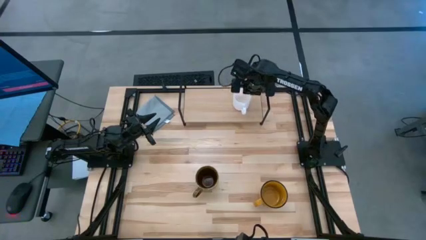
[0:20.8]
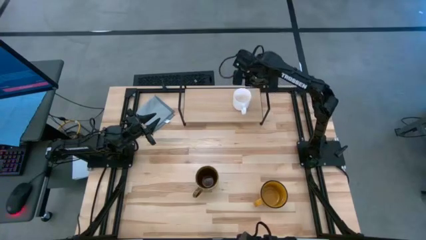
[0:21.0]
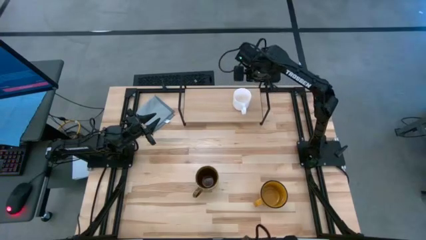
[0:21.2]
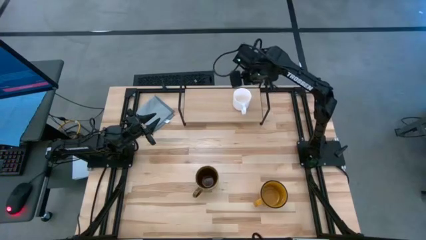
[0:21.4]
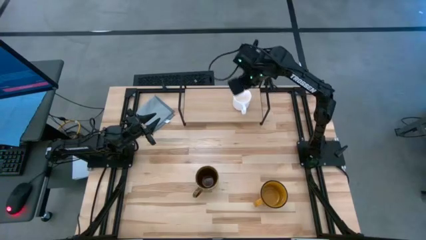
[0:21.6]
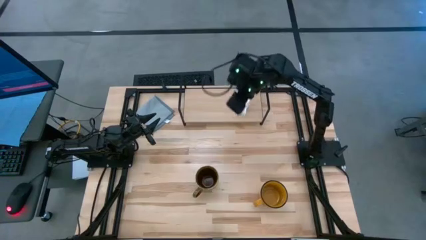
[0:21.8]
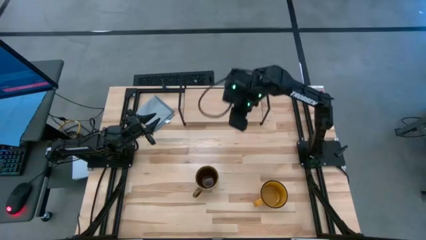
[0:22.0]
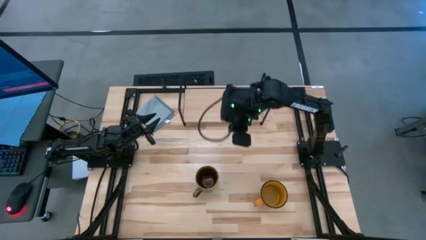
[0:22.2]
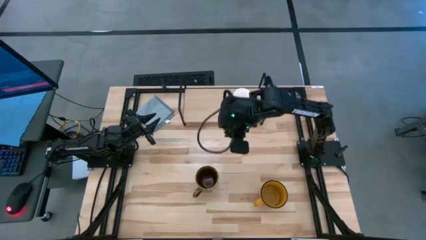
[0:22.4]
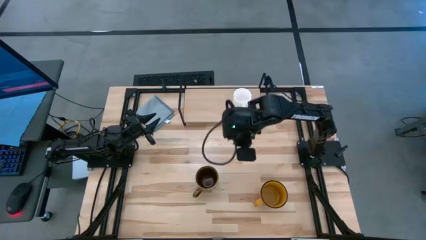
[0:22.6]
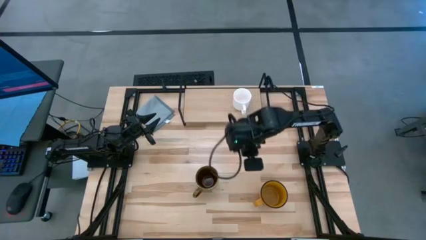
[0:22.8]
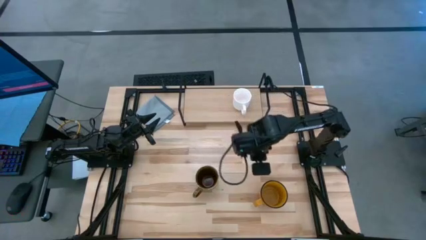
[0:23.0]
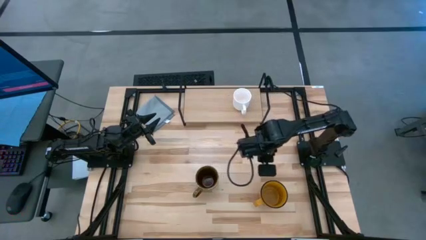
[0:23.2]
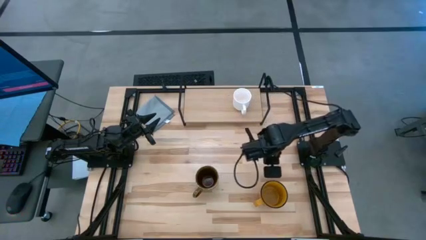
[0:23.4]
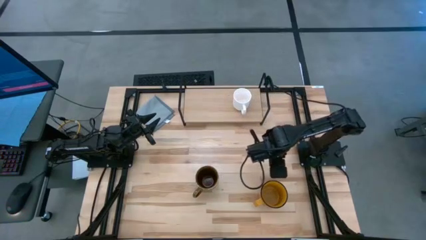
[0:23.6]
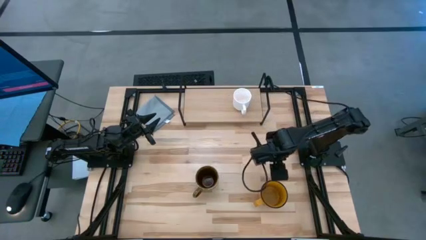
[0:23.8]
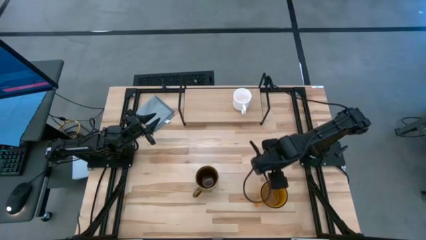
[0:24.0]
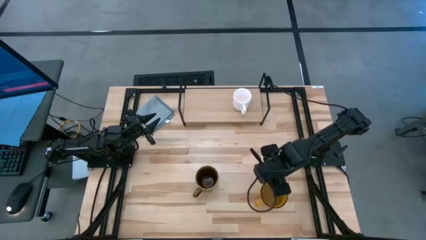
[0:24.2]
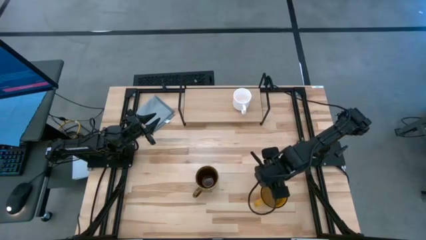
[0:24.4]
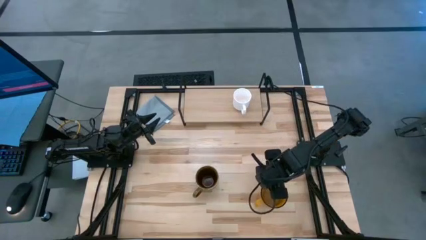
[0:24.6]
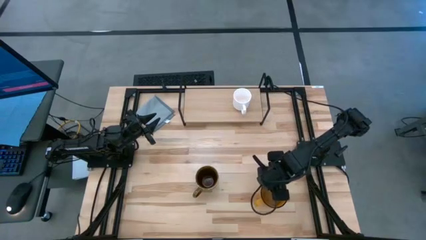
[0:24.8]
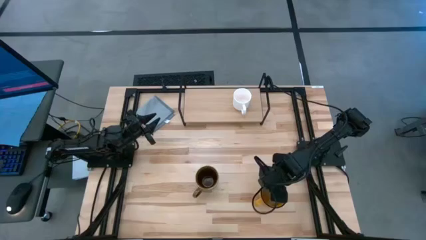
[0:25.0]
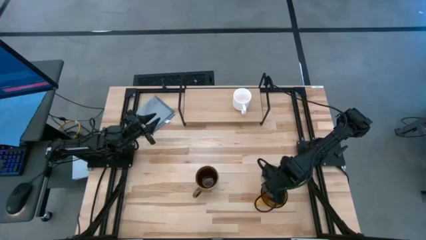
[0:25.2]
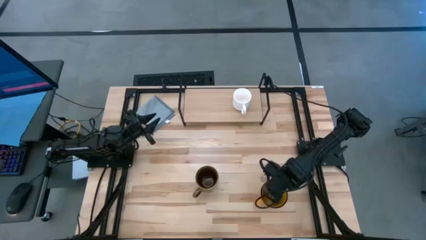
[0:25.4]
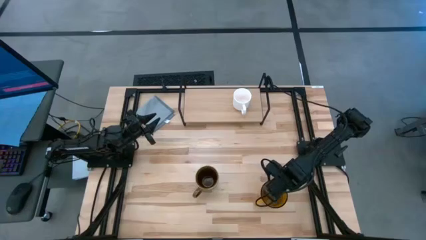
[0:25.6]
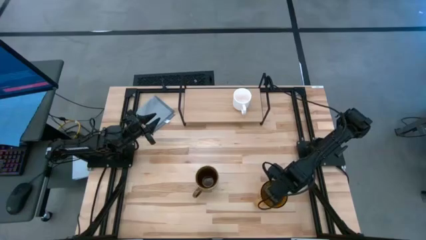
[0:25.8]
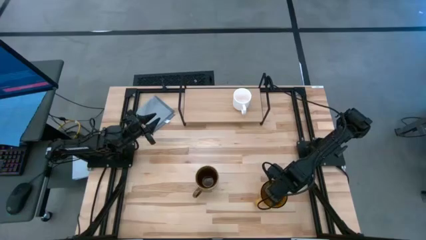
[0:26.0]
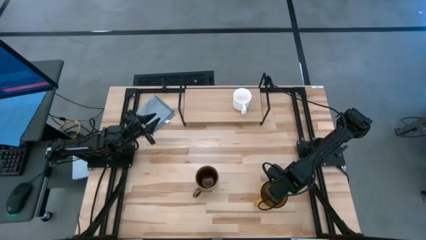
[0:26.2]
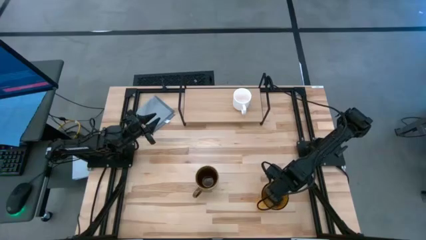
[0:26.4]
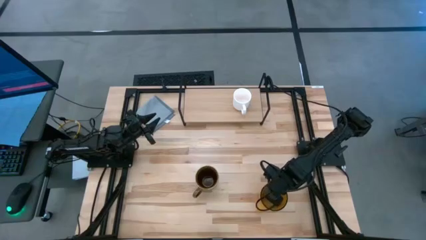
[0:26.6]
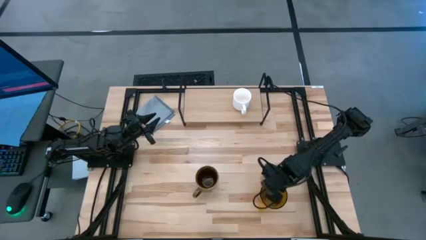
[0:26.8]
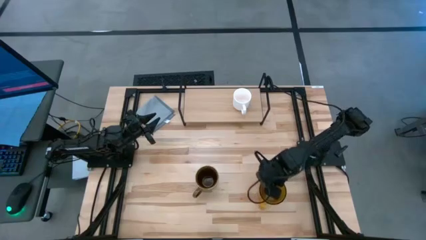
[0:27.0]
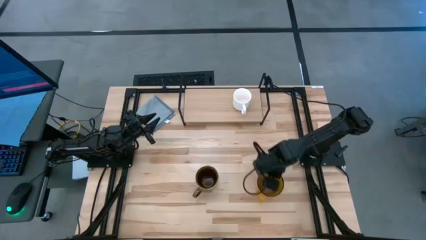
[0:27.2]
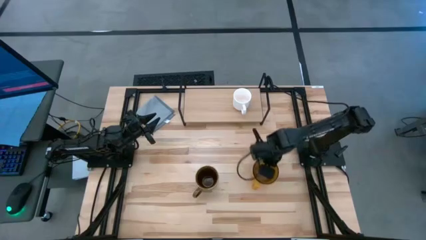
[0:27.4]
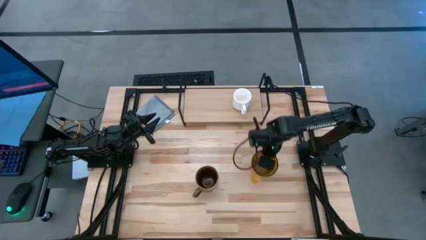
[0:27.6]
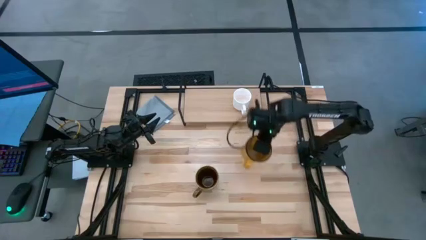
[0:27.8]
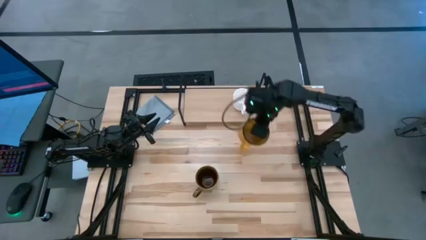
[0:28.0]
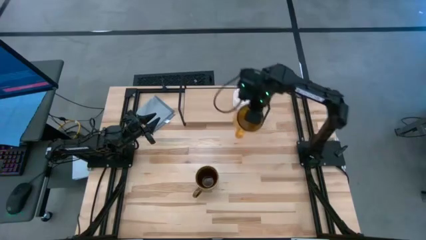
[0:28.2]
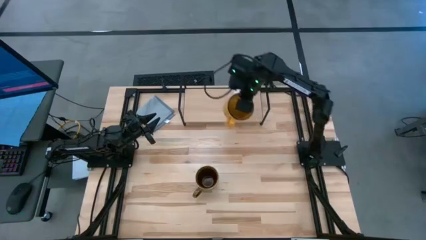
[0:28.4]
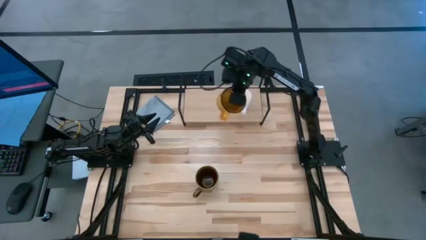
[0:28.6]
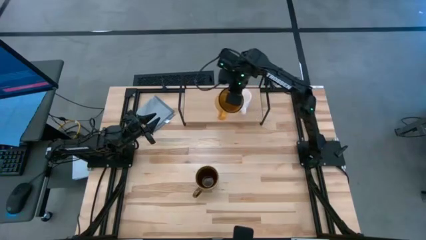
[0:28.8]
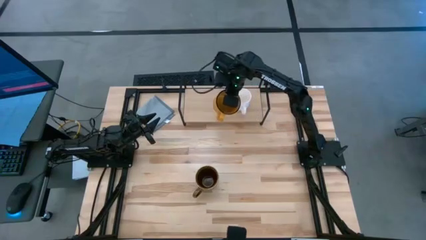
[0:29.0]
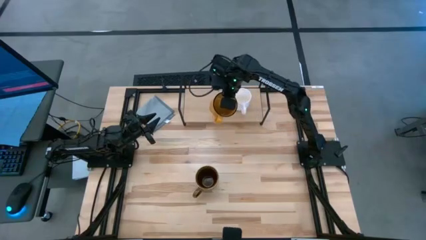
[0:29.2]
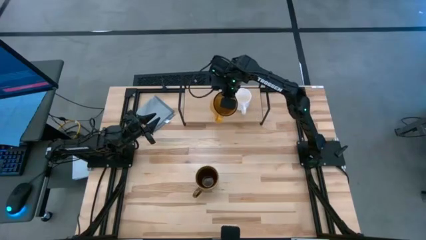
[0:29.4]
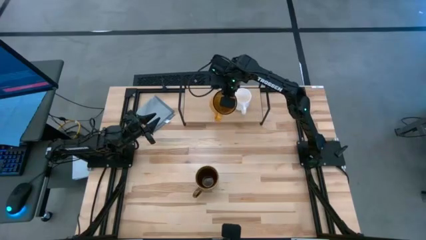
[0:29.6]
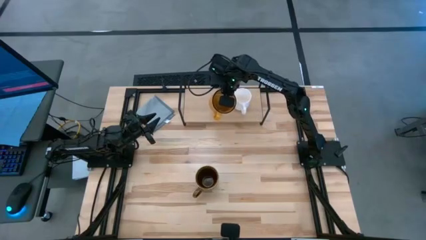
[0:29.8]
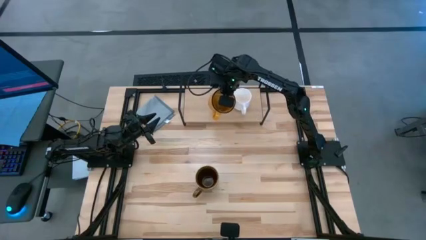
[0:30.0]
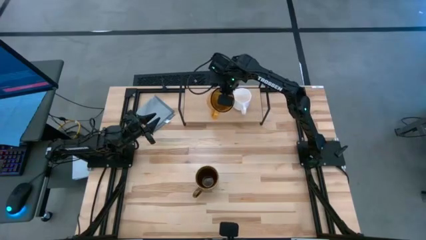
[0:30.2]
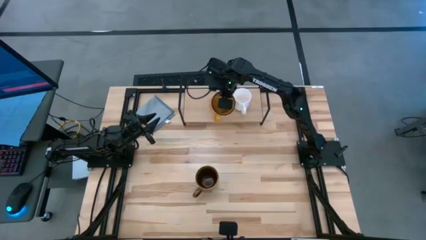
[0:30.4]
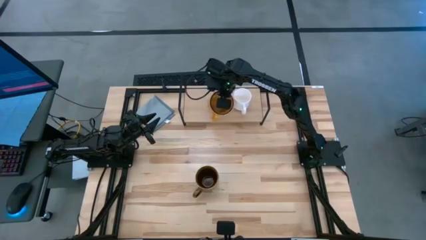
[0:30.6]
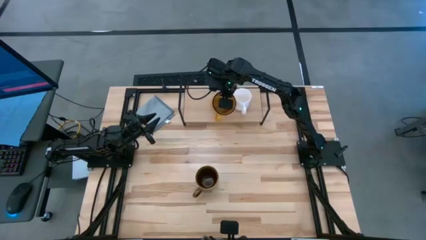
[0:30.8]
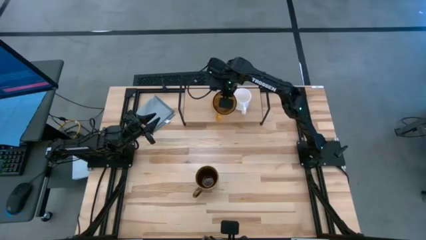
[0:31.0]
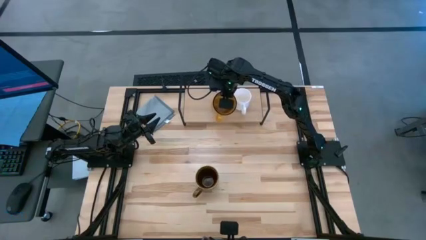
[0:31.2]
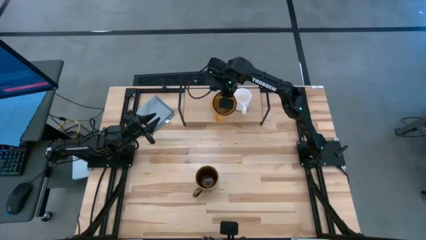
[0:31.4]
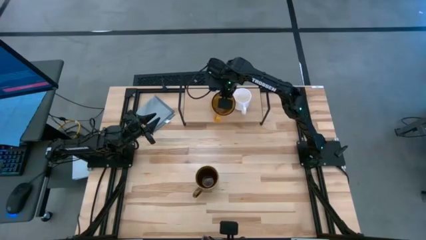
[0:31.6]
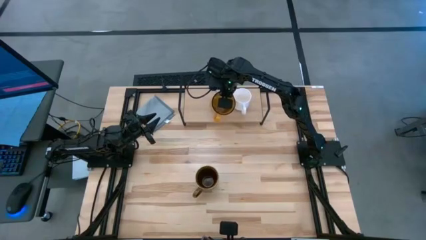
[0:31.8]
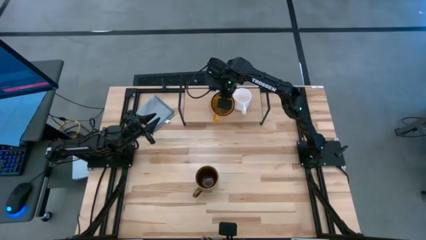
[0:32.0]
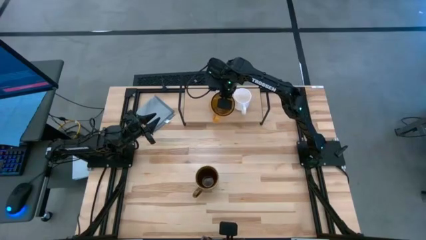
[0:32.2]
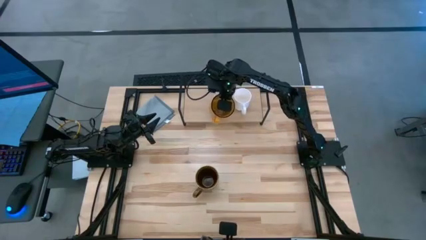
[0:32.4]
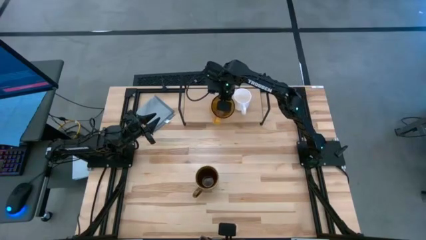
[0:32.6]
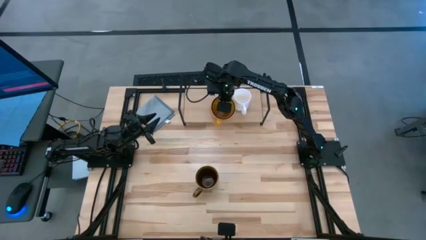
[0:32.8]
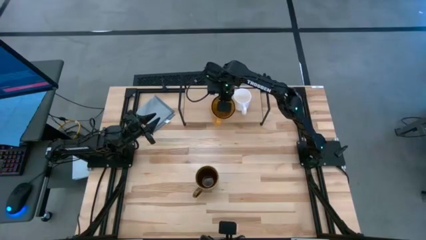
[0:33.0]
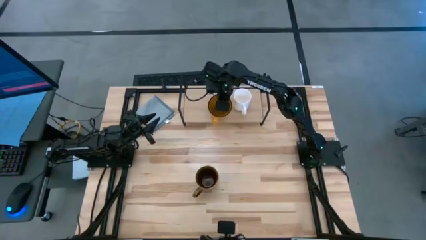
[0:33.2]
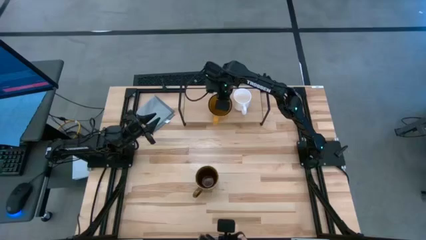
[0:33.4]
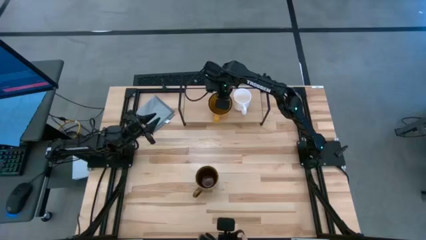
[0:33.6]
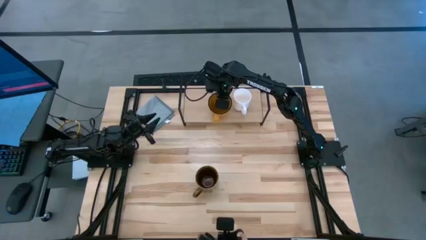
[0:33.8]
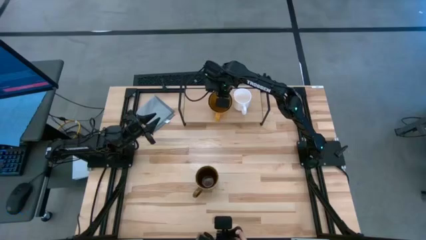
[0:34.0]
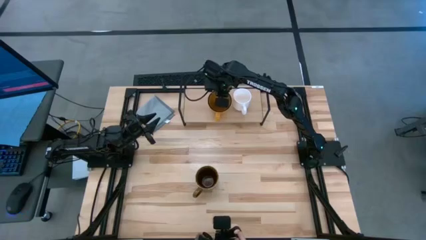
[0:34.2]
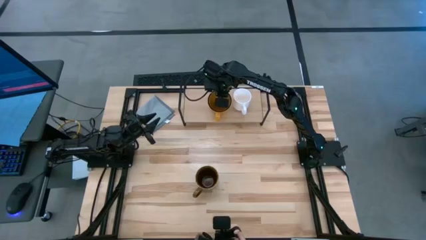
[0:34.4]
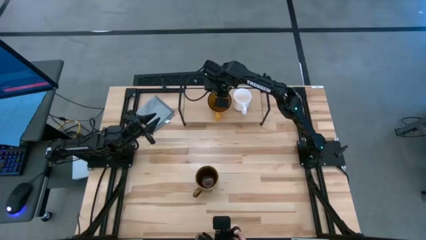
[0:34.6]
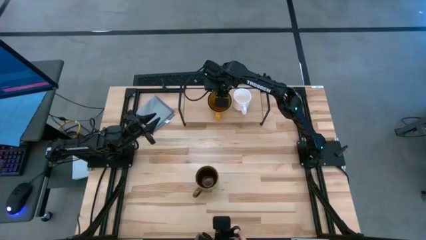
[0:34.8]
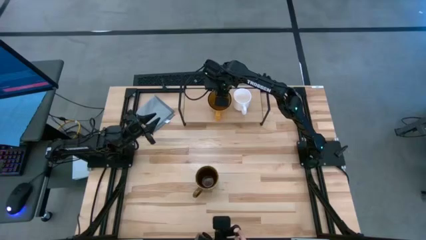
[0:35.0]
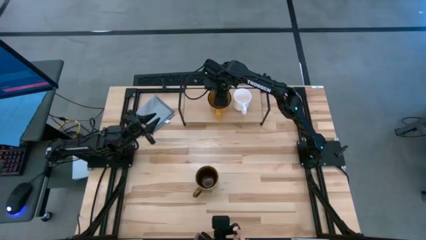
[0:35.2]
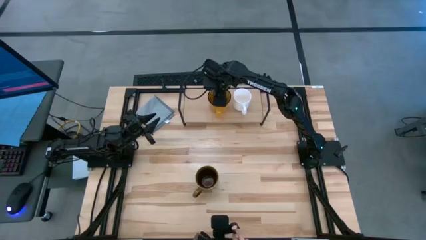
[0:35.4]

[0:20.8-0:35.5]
Task: Stack small to large cups/mugs on shelf
Put the yellow mug on the shelf
